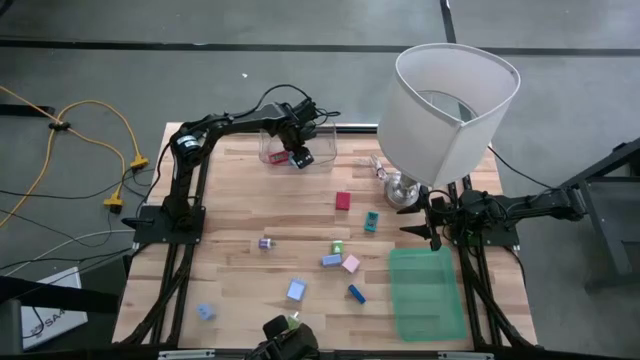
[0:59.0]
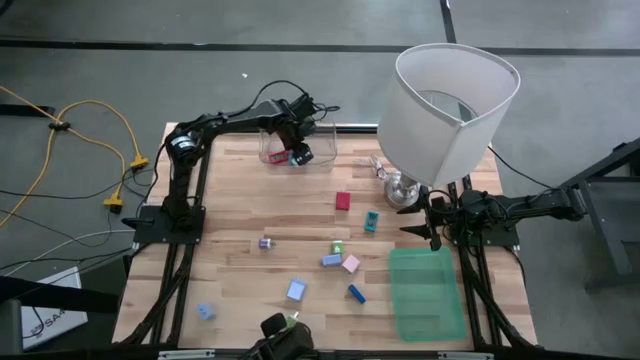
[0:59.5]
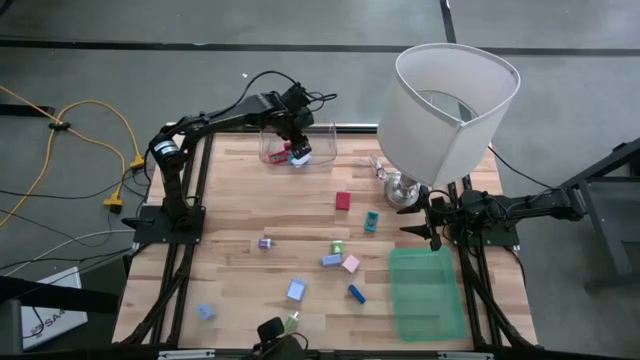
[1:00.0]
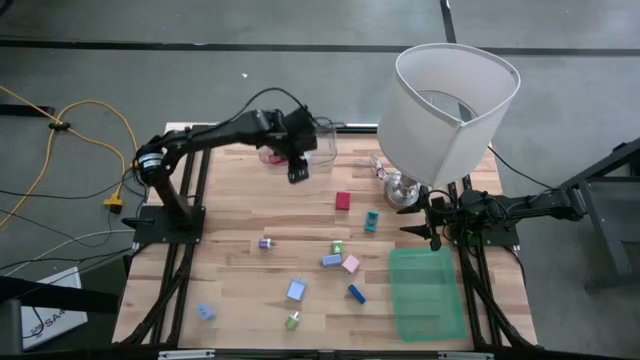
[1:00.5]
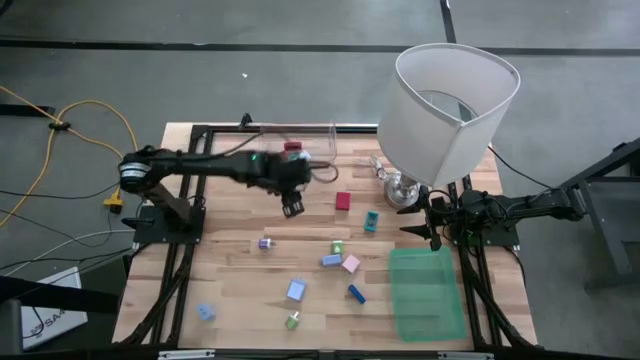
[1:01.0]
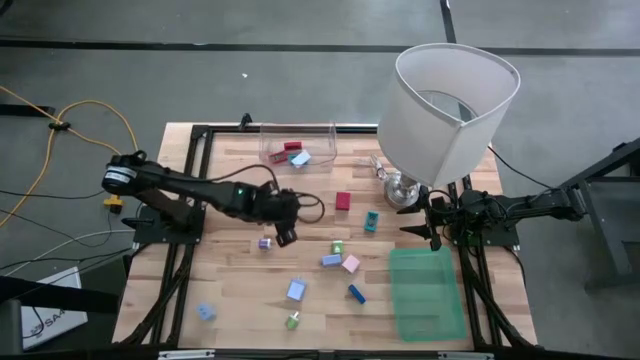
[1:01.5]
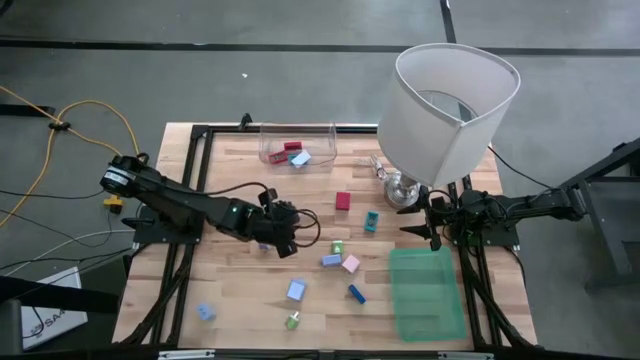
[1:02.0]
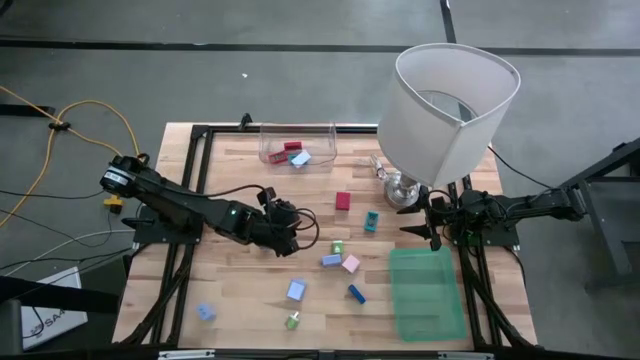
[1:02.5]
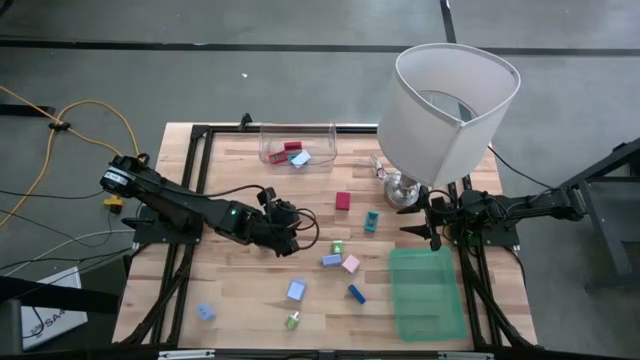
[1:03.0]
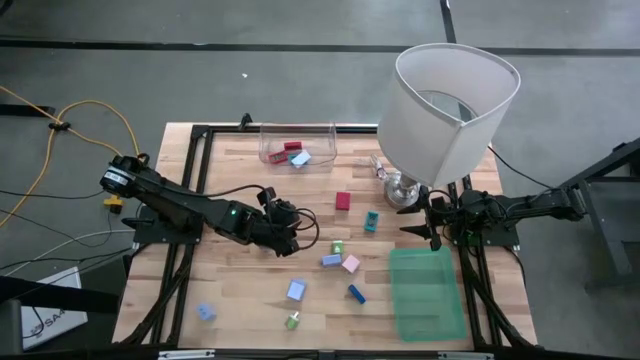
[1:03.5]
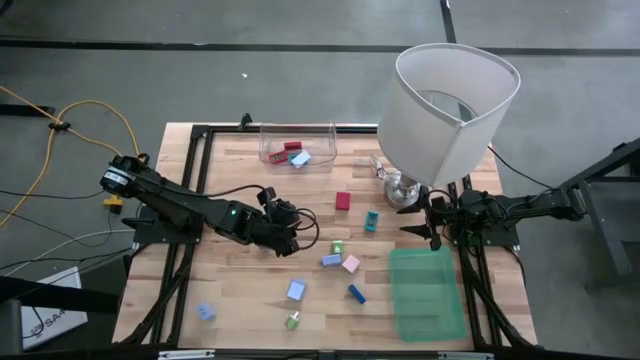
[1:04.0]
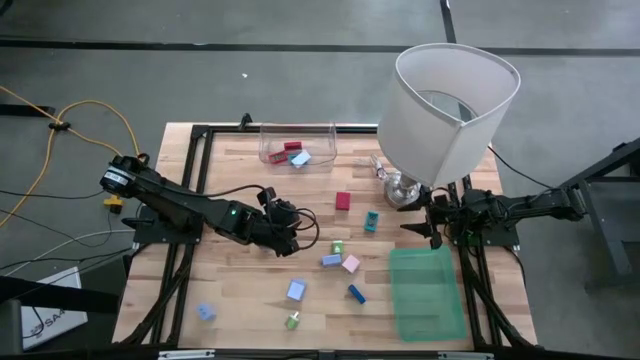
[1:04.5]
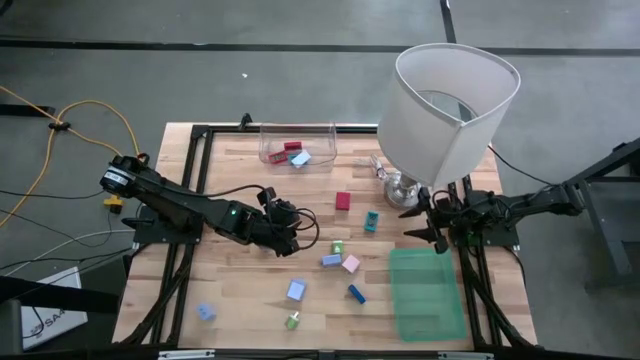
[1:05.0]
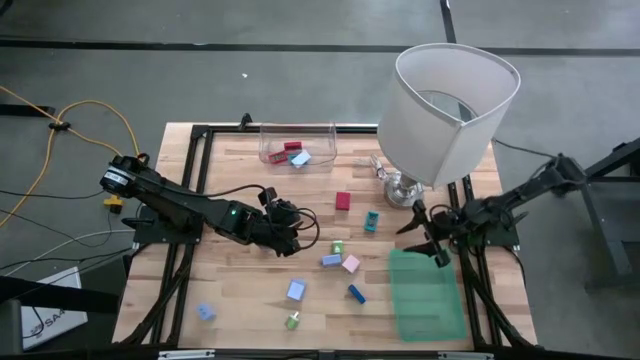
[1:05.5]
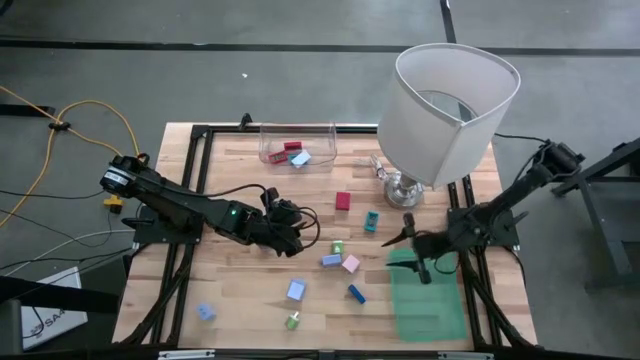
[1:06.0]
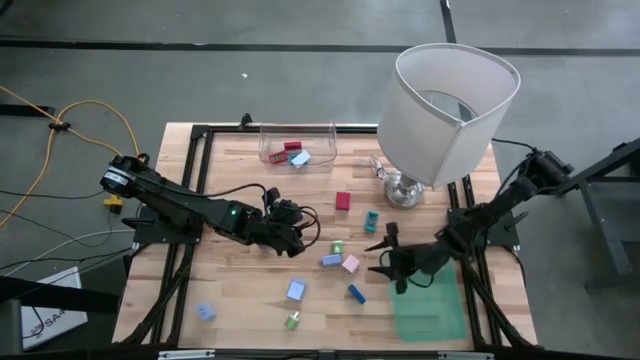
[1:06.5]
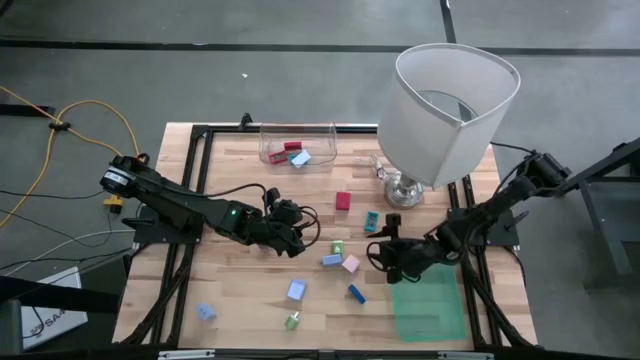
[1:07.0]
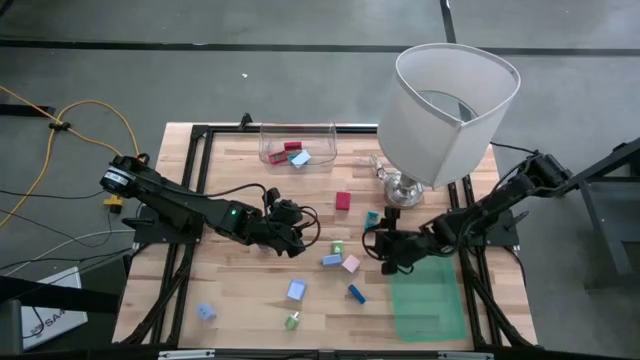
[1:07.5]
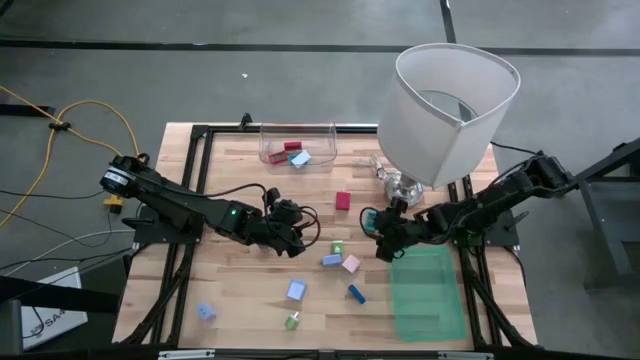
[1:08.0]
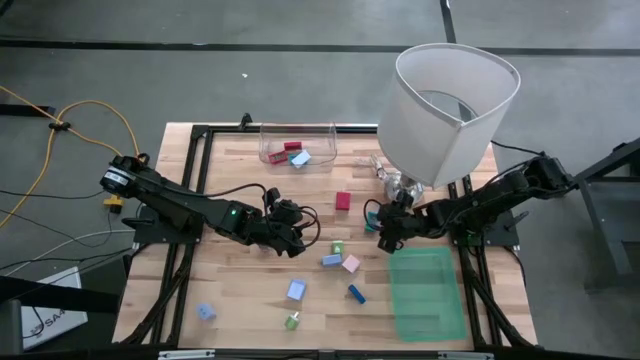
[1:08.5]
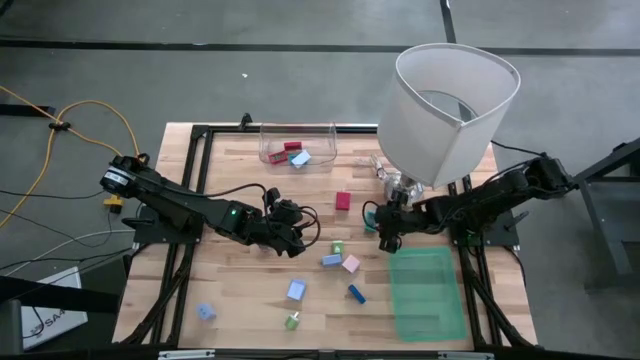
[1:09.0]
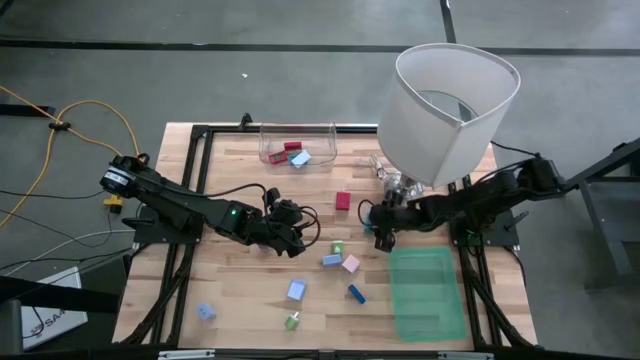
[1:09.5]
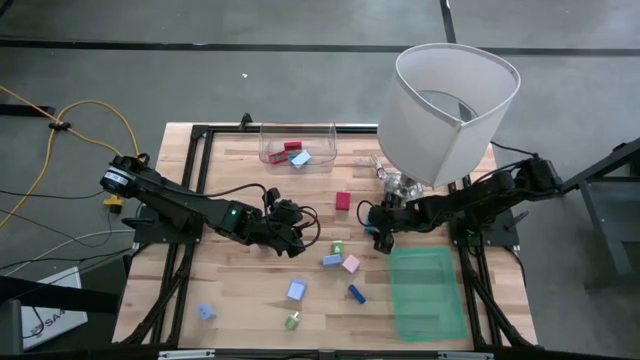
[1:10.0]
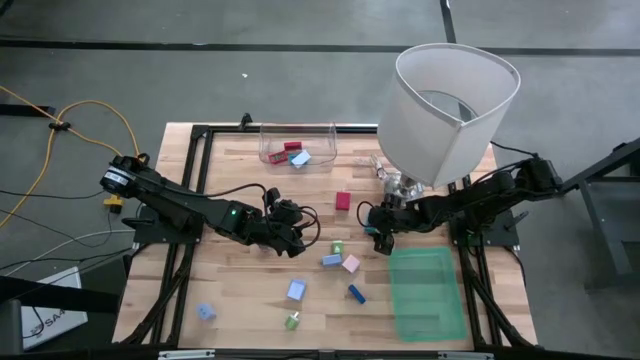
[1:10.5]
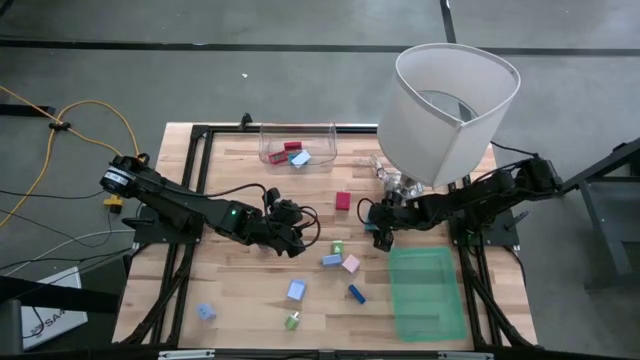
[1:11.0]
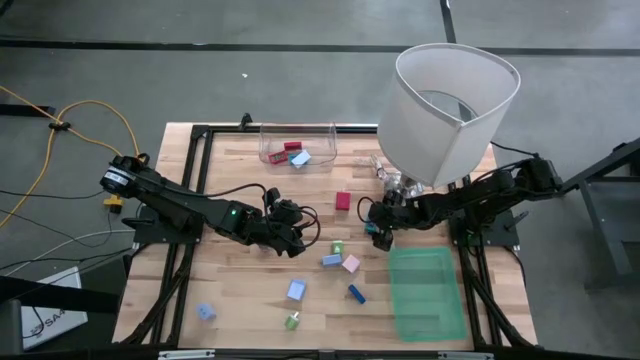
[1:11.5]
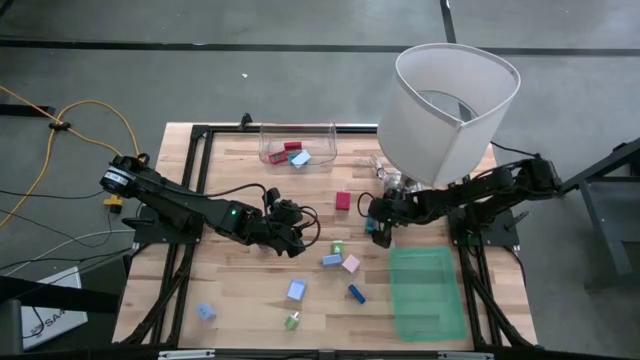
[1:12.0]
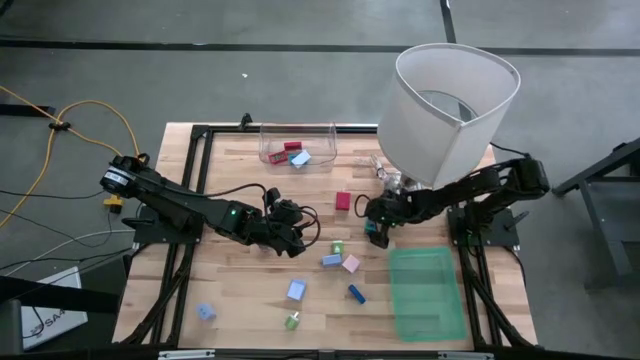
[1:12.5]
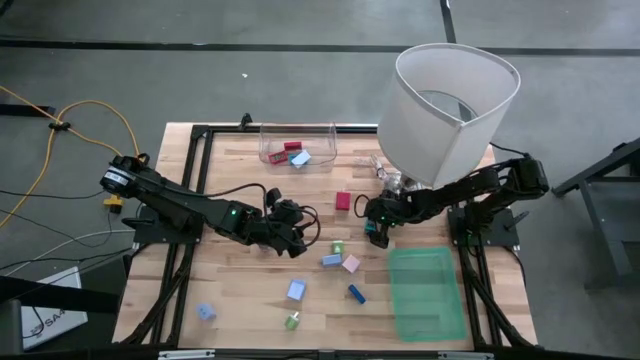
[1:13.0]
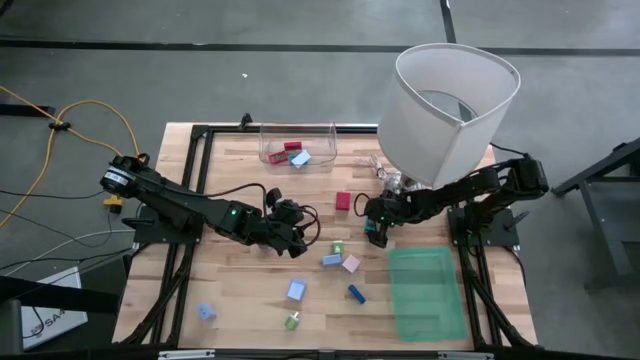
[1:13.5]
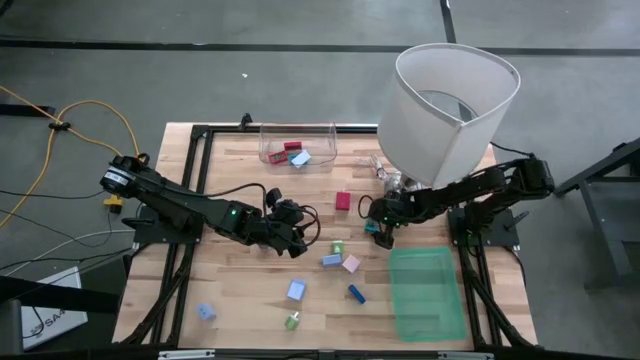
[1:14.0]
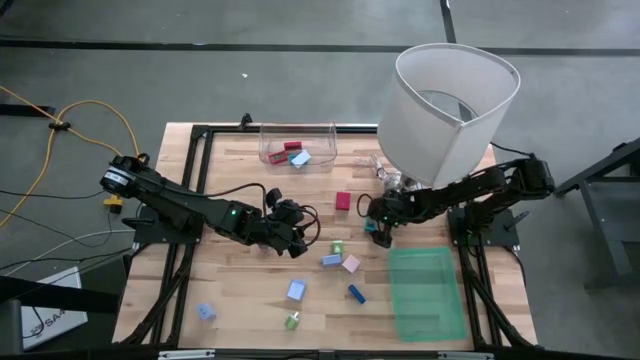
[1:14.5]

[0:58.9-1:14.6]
Task: Pick & Place Office items
Put the light blue digital clock into the transparent bin

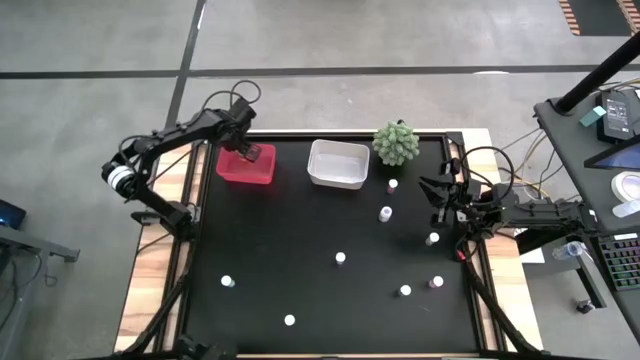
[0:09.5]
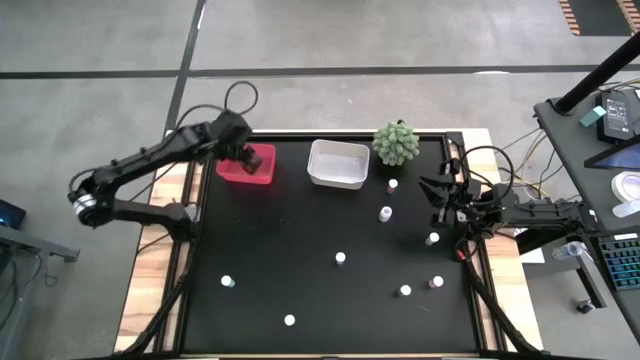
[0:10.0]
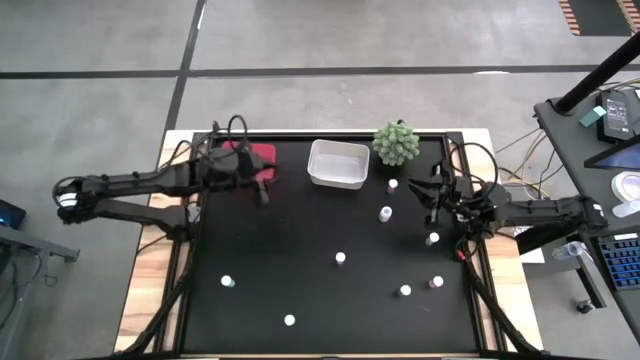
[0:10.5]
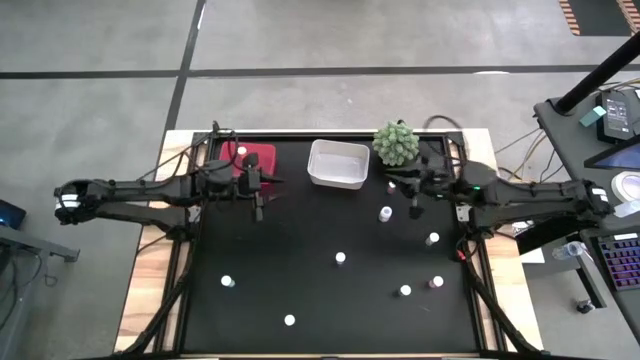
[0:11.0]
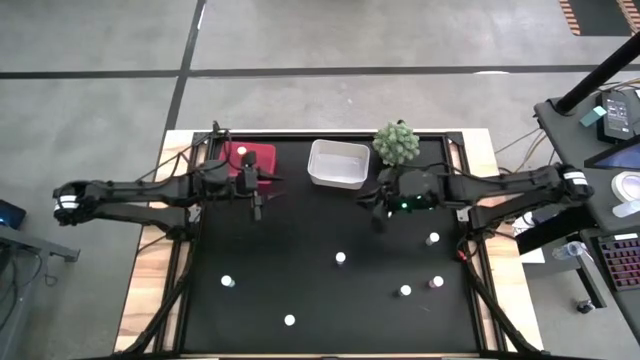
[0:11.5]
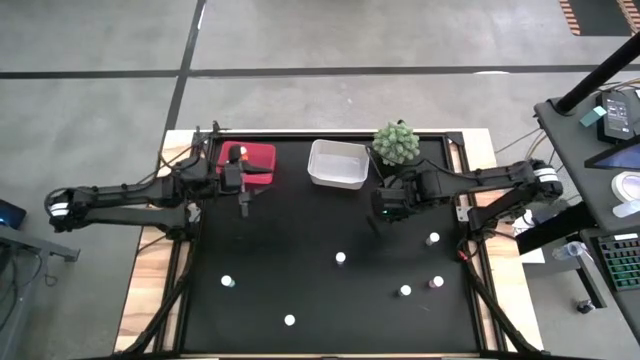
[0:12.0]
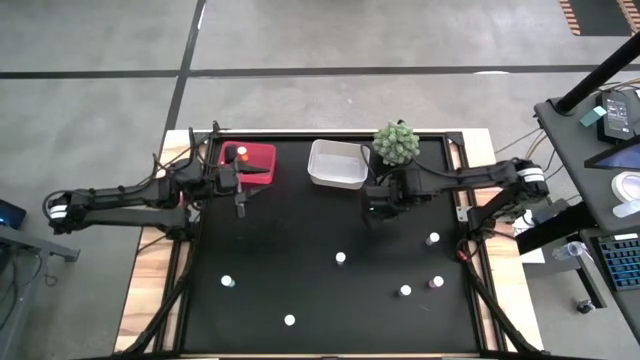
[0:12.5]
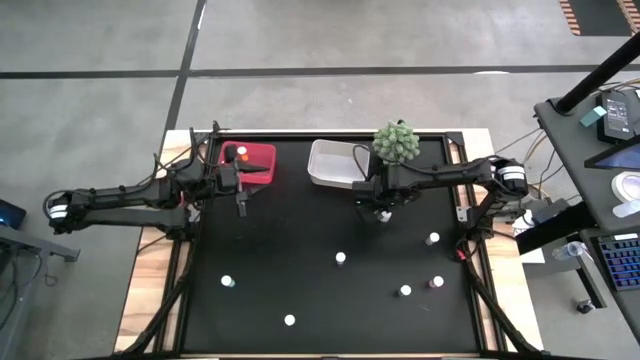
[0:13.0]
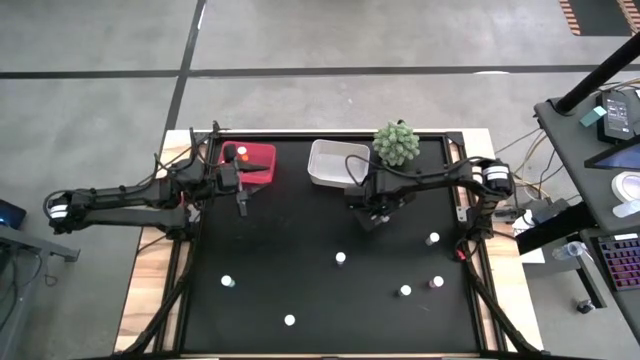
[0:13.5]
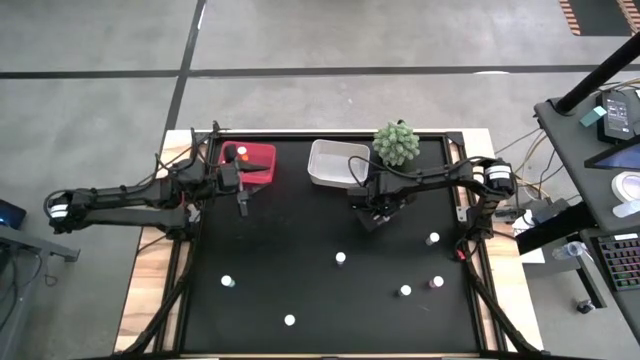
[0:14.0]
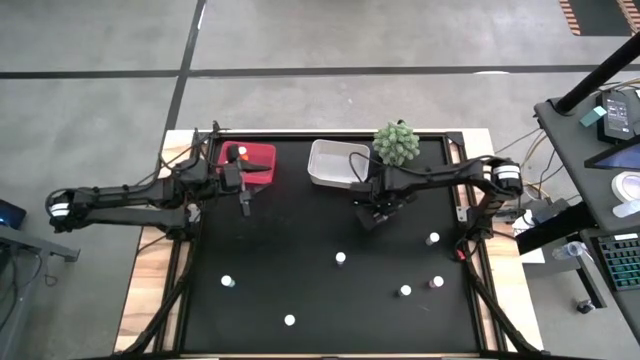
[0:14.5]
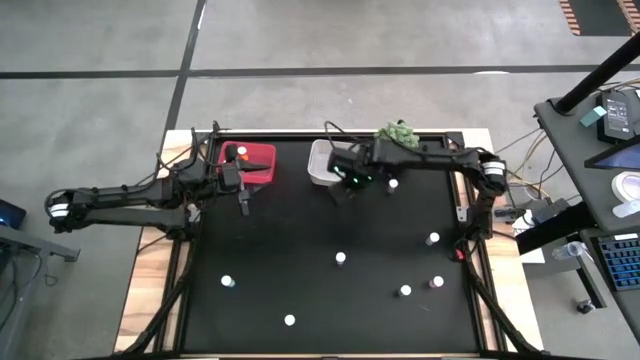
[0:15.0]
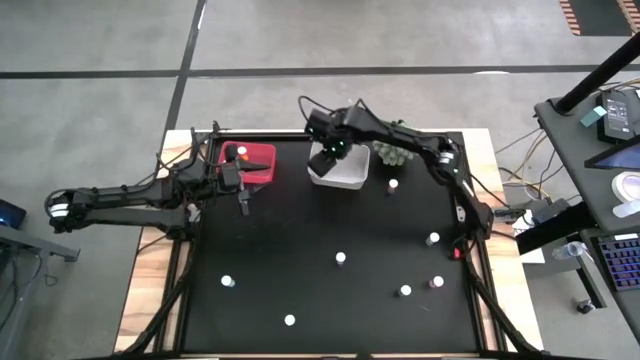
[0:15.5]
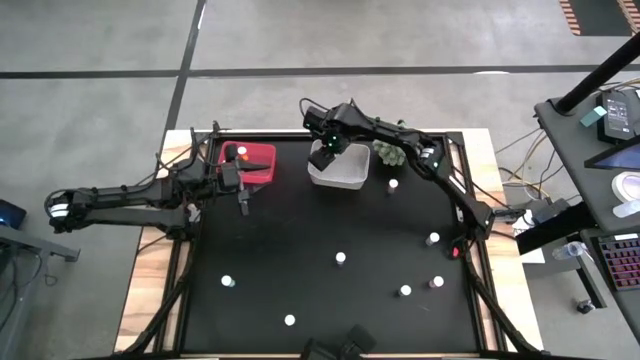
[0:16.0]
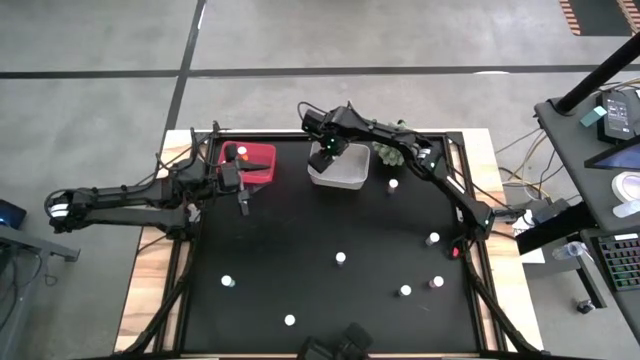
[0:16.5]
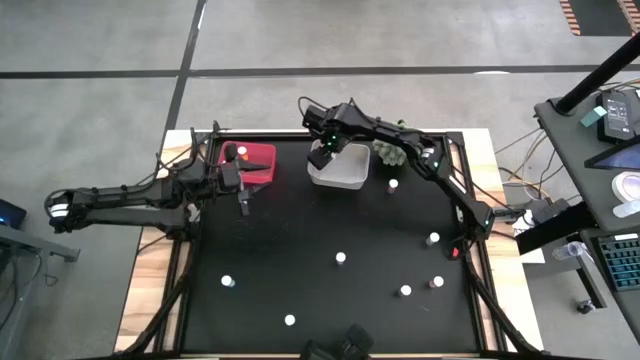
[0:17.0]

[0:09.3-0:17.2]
Task: Pick and place medicine bottles into bin by pill shape (circle, oval)
Put the transparent capsule bottle into the white bin
